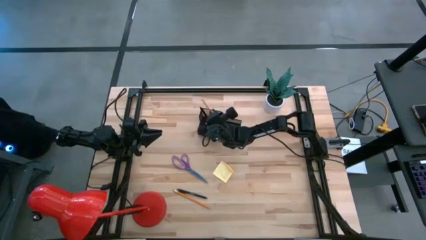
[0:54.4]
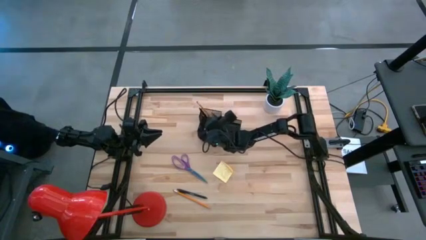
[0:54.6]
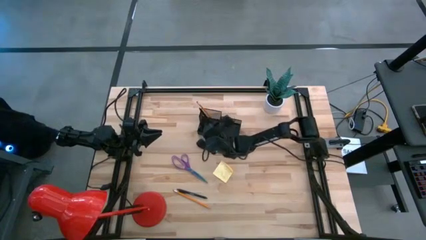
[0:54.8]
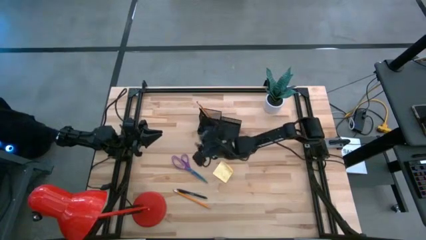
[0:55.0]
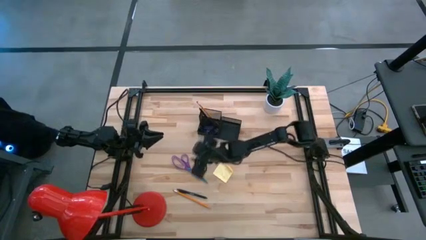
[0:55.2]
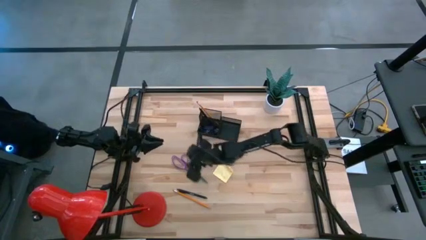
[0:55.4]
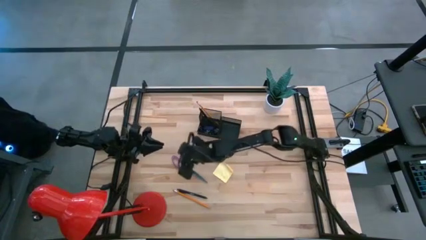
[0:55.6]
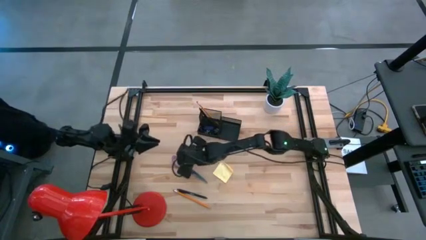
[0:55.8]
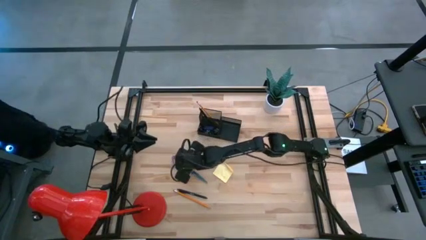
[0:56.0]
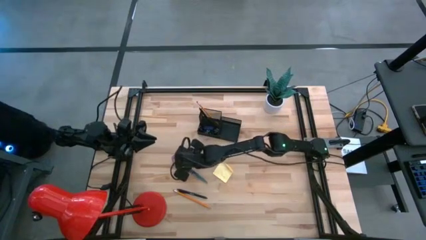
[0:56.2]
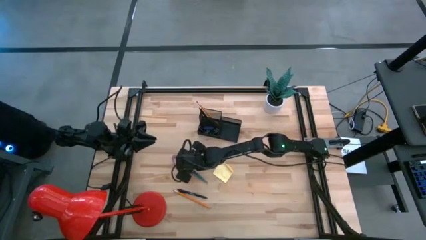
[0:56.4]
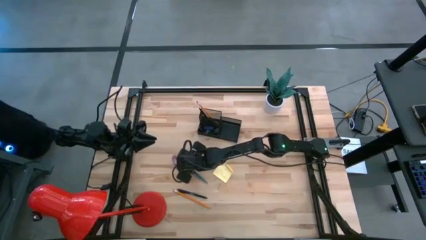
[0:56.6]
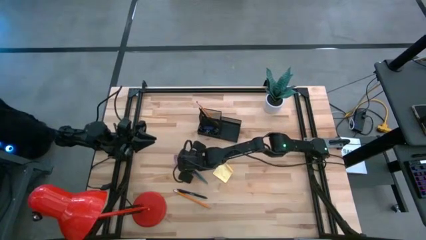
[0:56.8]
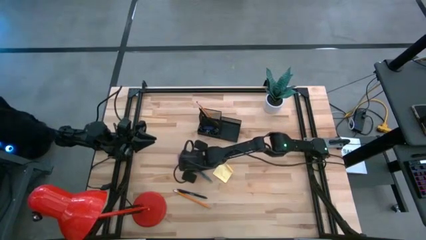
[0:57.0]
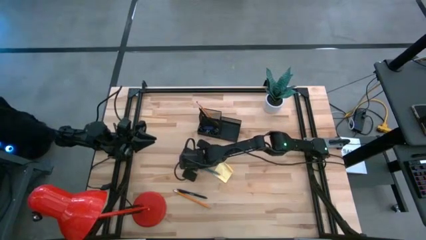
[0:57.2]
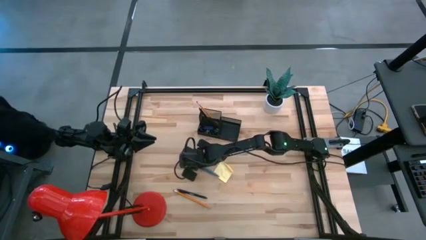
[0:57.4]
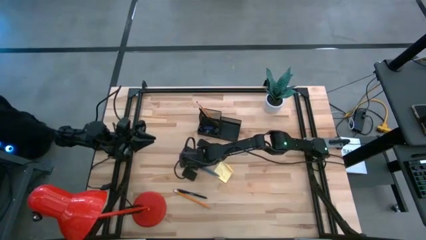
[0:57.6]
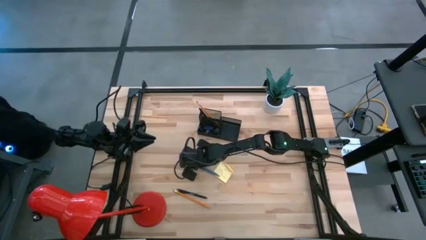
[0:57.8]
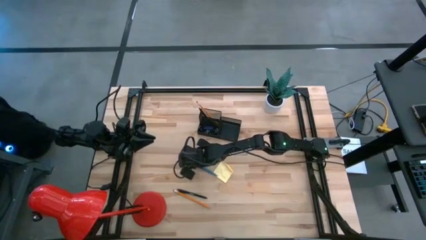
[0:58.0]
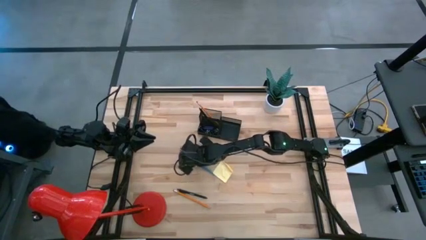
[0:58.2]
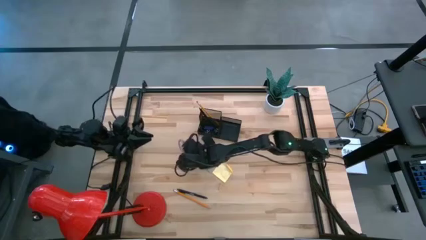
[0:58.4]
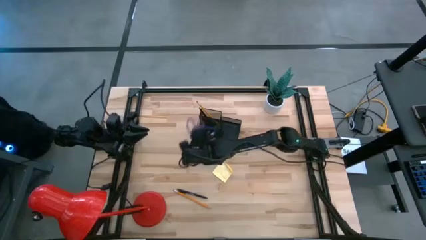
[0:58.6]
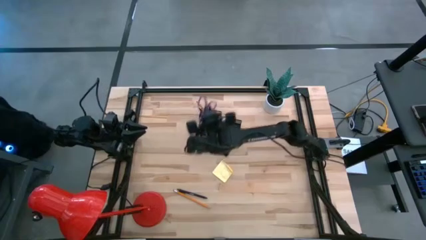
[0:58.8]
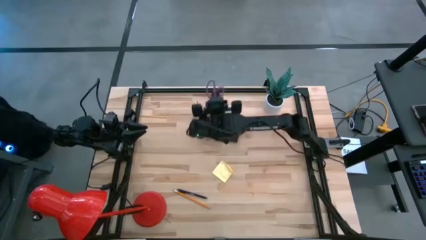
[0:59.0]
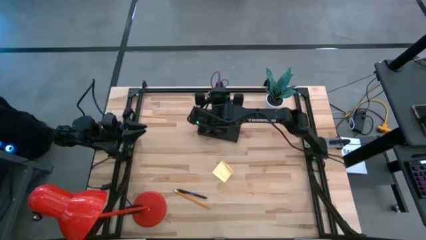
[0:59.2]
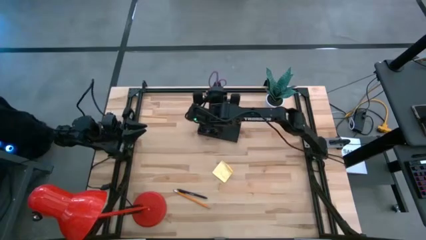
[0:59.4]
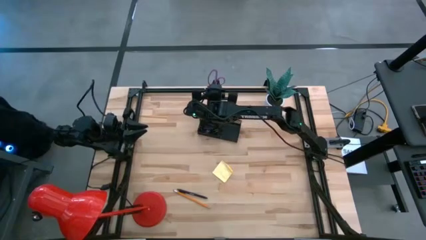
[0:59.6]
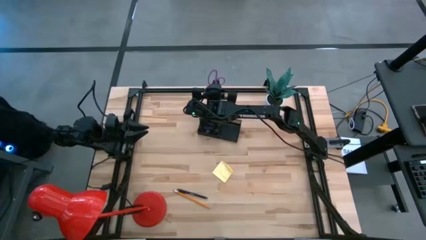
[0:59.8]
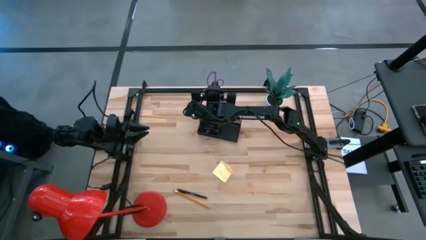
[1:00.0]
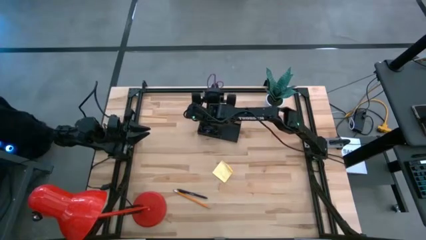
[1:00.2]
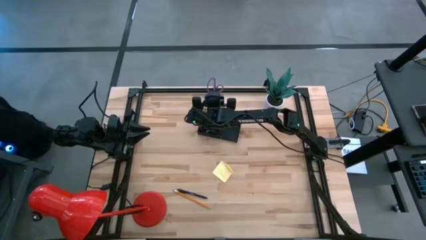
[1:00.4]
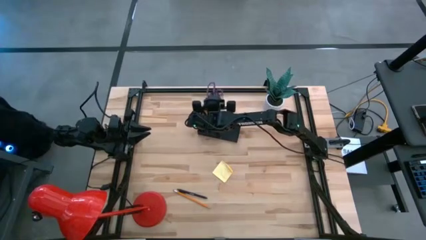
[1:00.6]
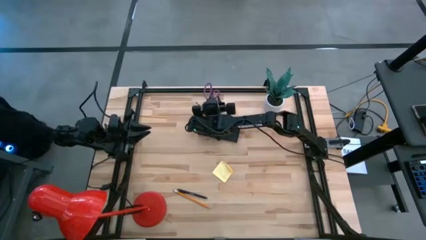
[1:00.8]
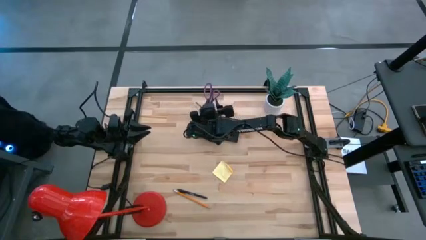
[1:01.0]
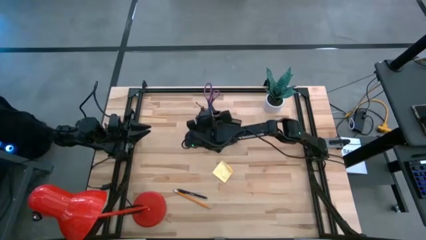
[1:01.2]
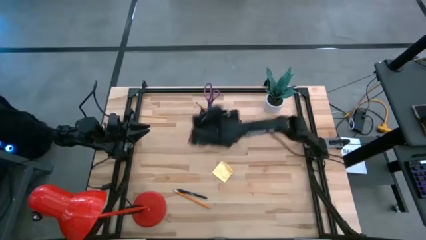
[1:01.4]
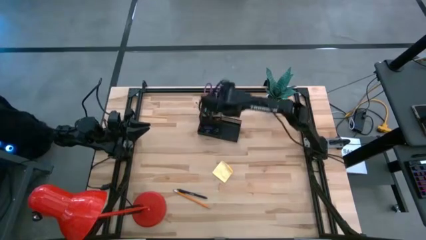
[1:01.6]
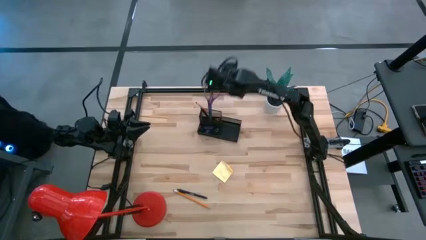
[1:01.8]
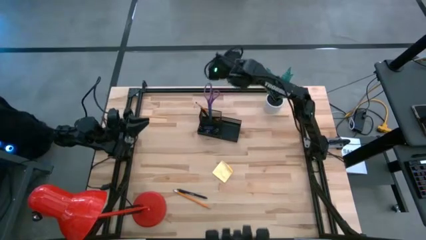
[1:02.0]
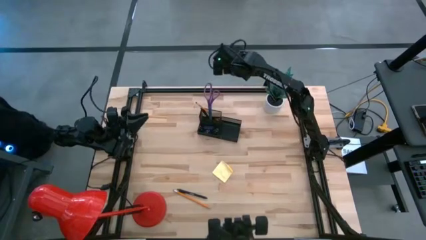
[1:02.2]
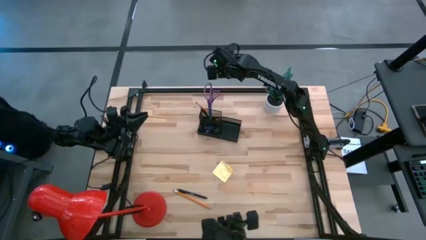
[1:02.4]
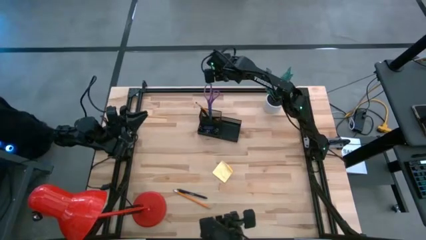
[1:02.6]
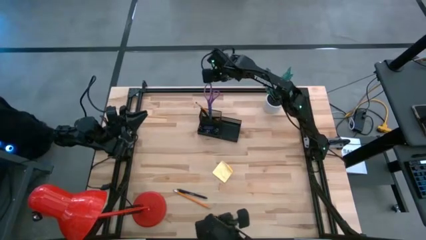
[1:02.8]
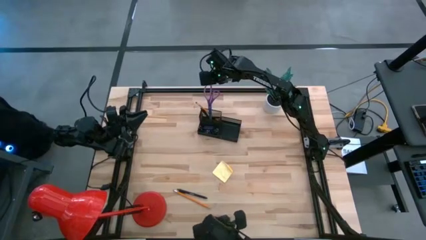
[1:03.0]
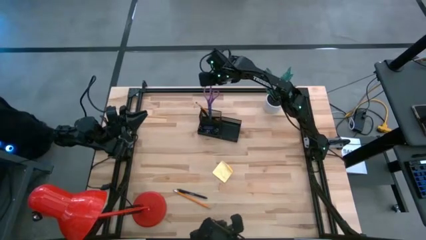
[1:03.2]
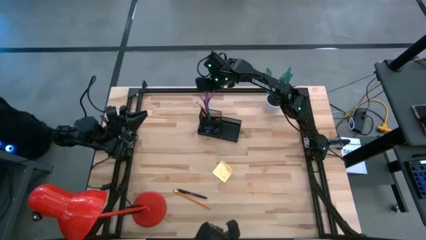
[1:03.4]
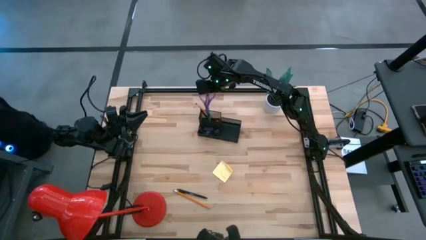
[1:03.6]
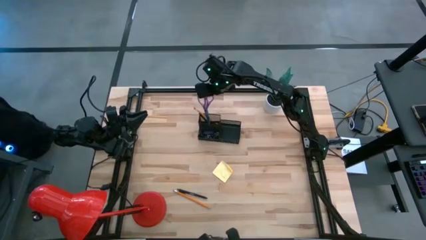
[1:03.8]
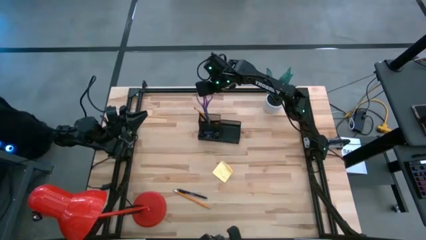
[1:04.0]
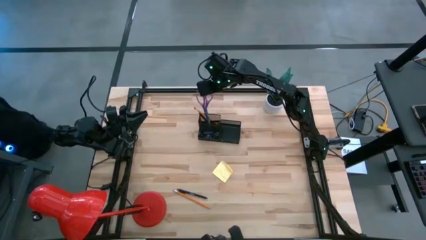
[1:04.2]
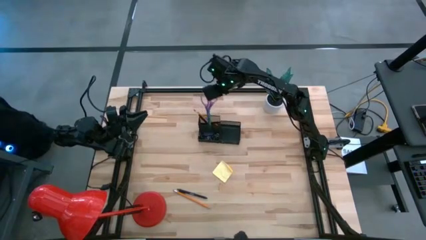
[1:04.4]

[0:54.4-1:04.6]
Task: Pick and place office supplies into organizer
Put the scissors into the desk organizer

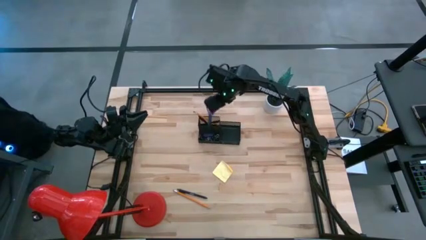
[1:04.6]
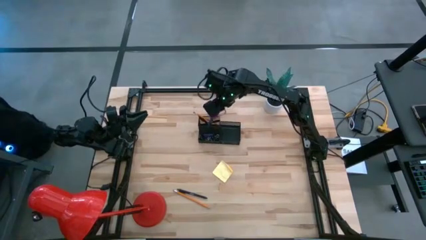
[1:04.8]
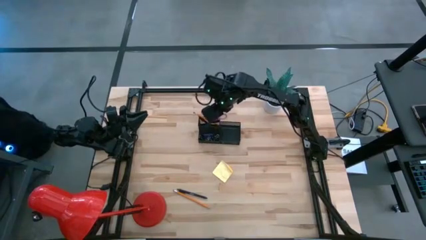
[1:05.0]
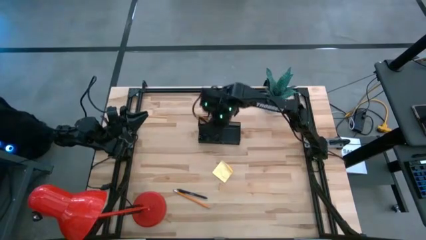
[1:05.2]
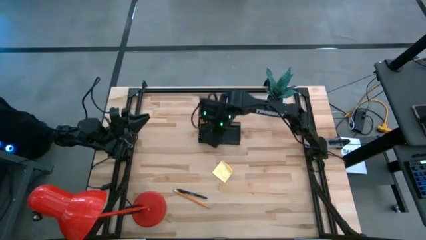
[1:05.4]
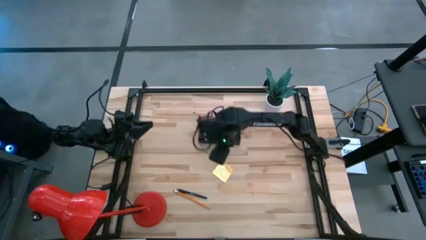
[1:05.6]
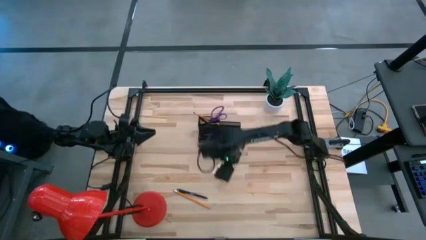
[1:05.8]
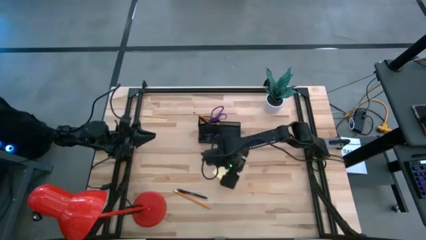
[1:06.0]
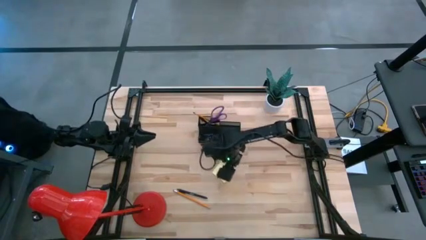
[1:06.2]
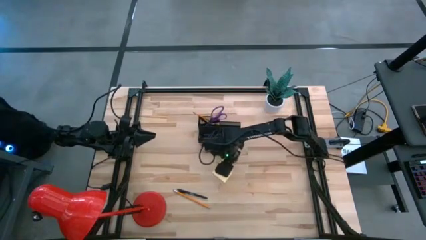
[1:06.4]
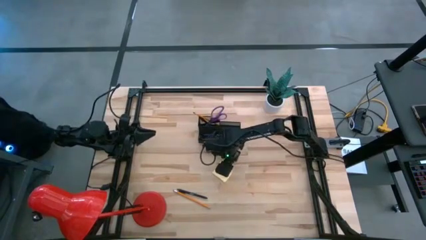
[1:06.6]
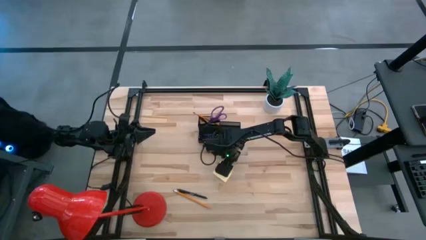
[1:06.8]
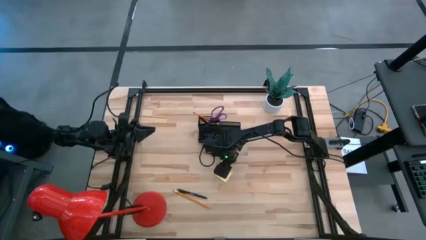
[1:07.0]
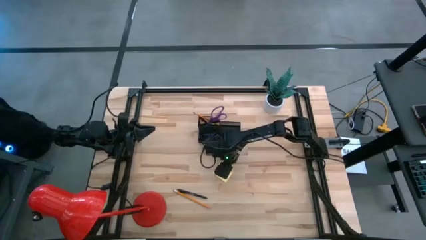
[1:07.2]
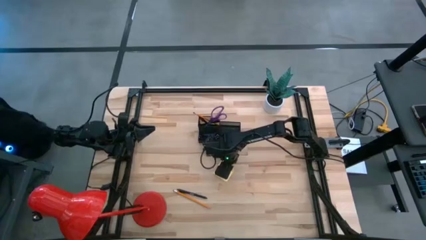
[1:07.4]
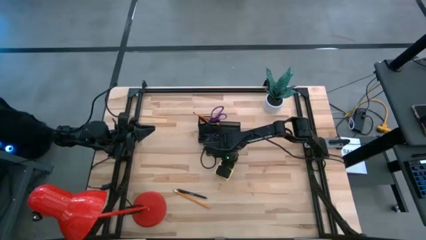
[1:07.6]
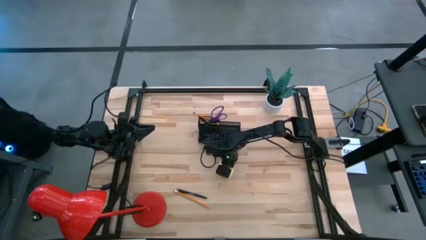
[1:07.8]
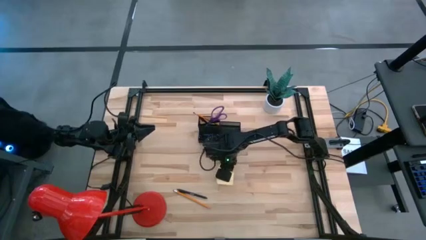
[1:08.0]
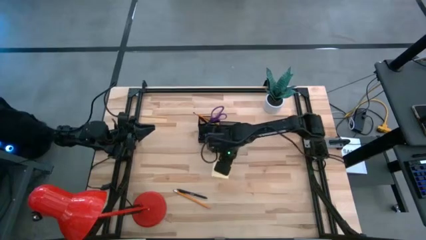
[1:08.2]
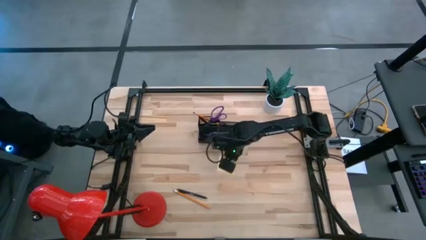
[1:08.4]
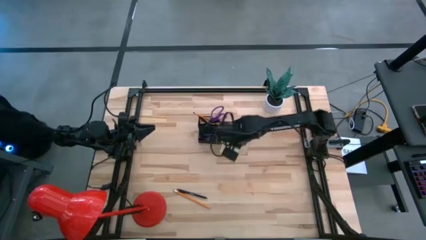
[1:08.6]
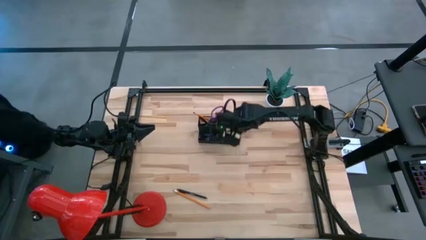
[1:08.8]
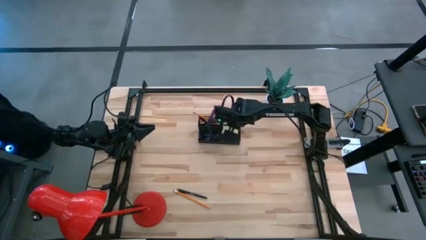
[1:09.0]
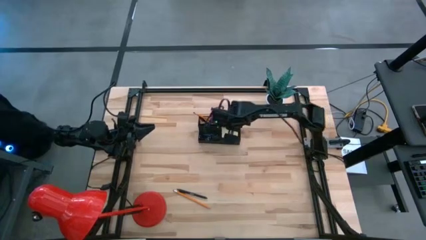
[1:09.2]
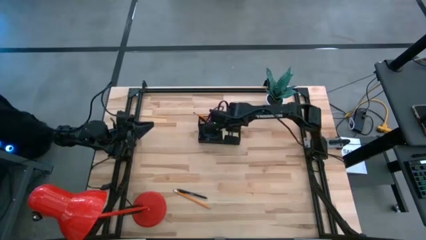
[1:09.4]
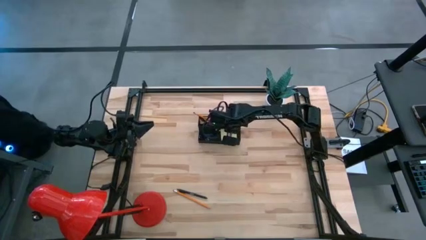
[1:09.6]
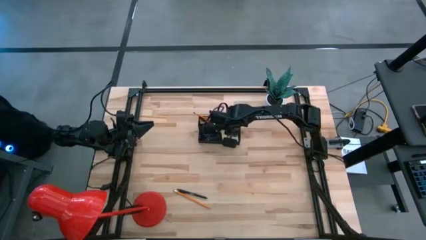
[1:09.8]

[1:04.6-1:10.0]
Put the yellow sticky notes into the desk organizer
